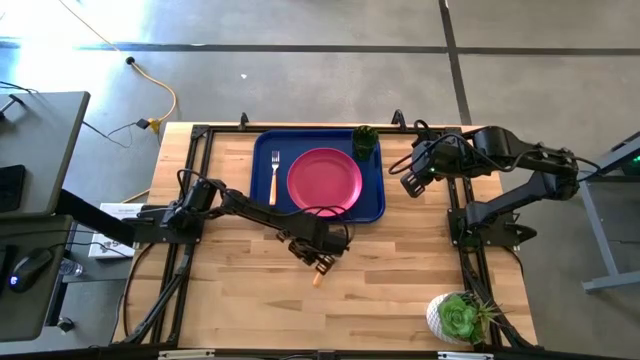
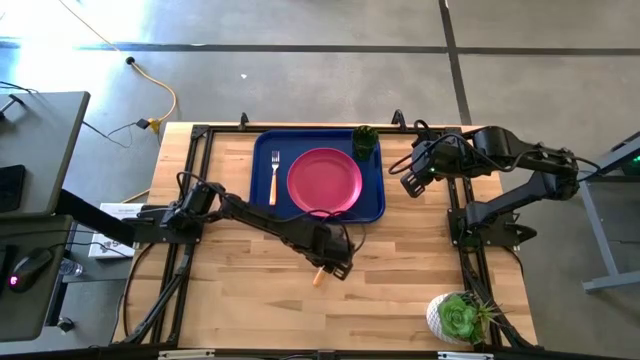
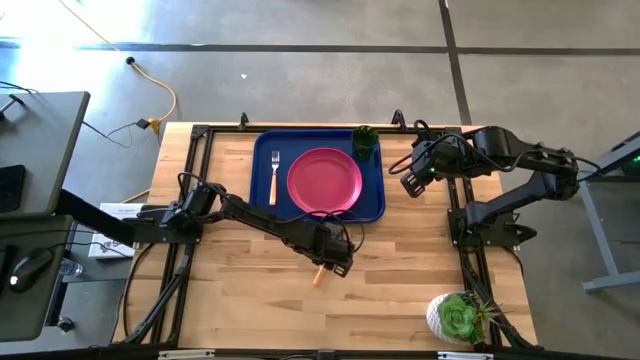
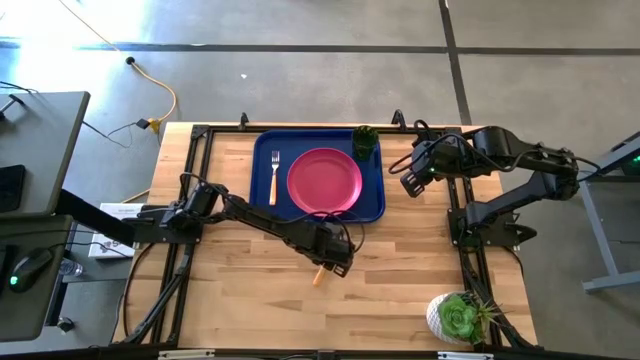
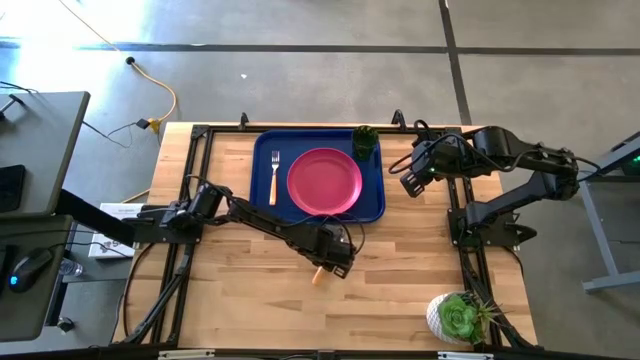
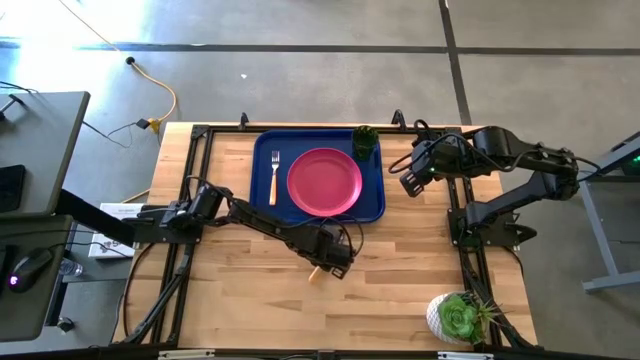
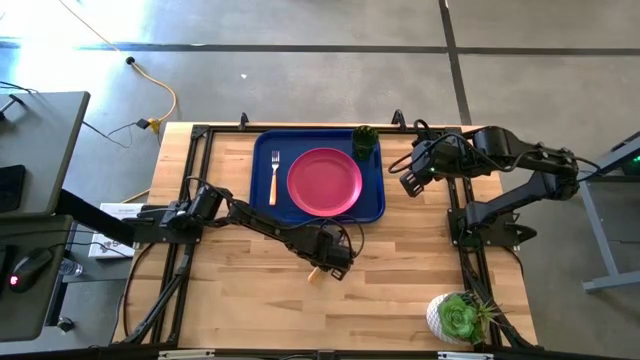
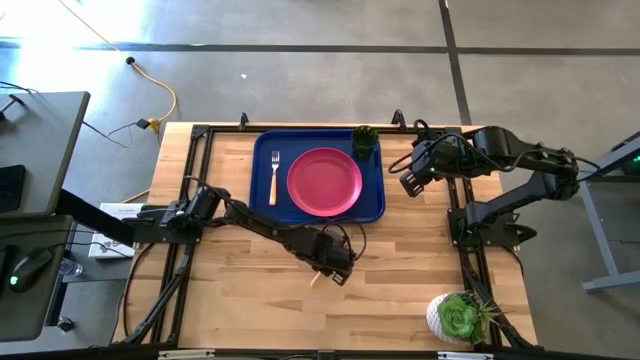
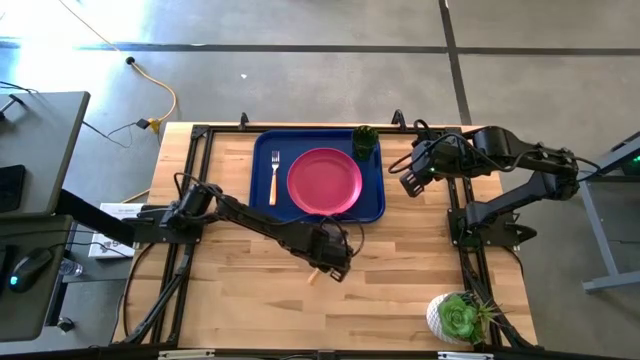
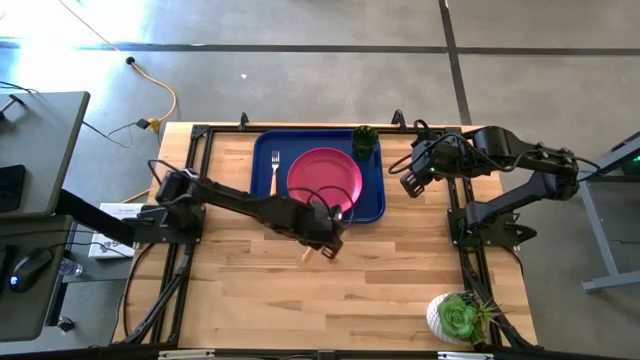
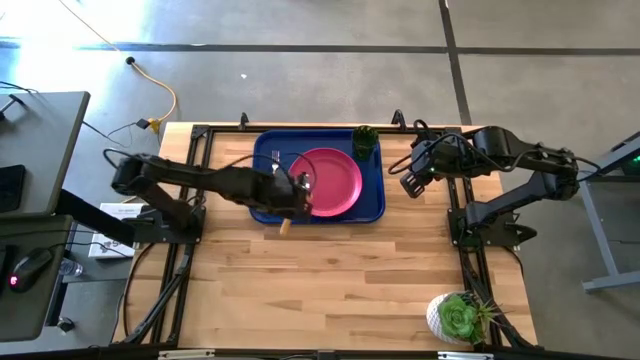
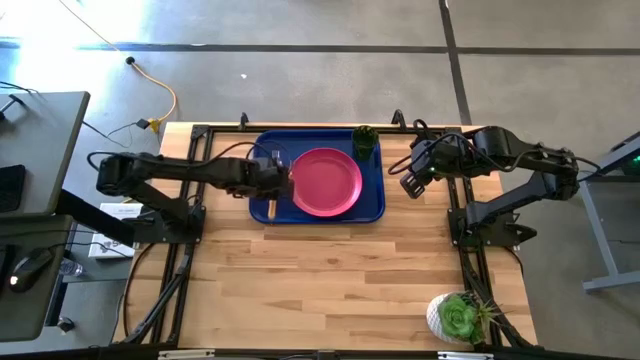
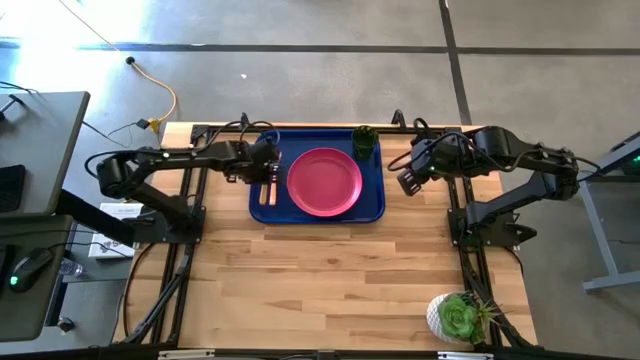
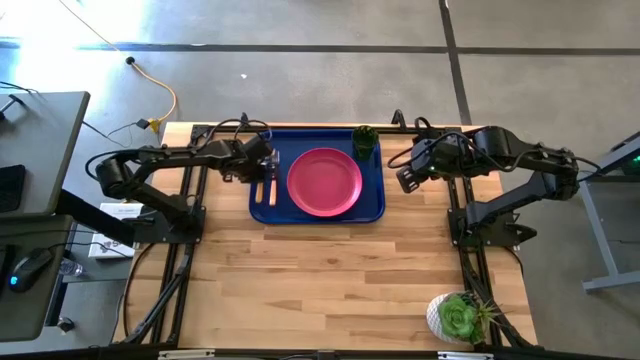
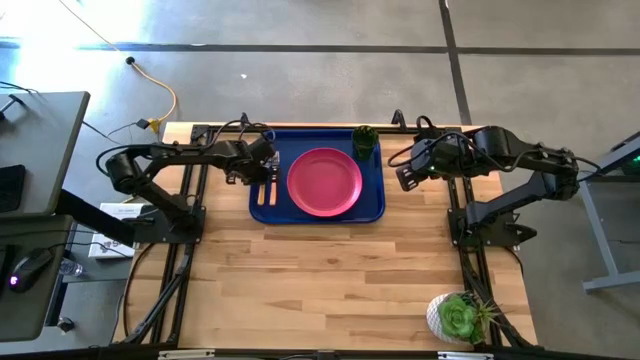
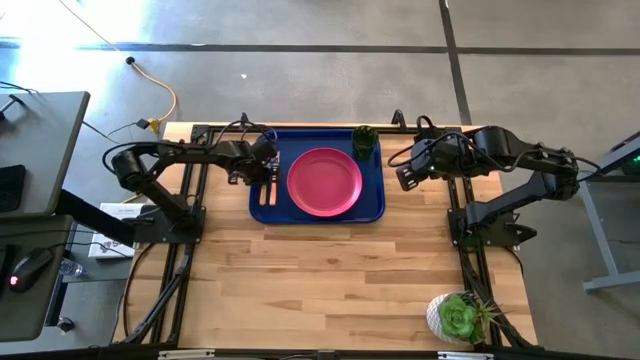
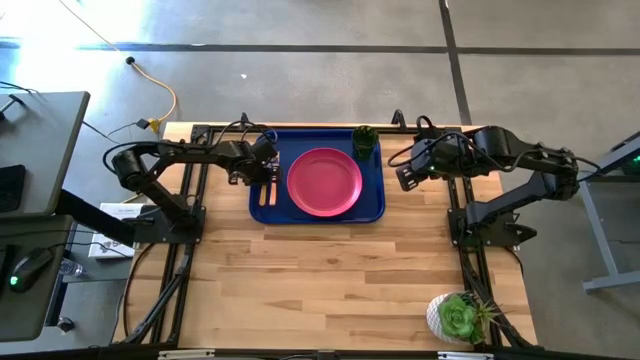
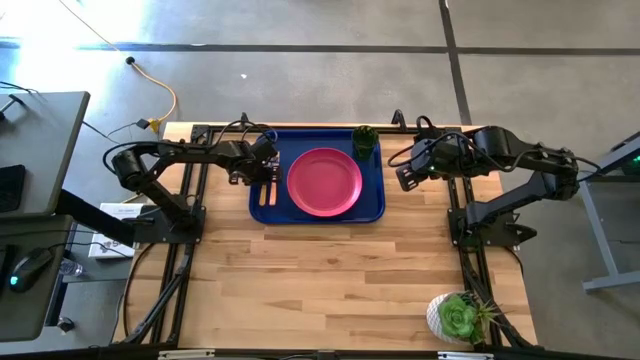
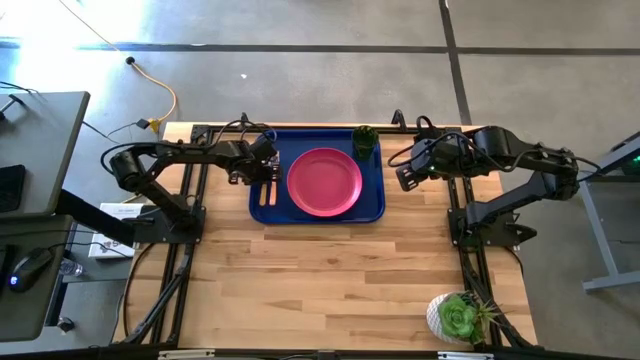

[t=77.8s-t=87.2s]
Task: Pick and place plate/cup/fork/spoon on tray
Put the orange spoon on the blue tray to the right of the orange fork

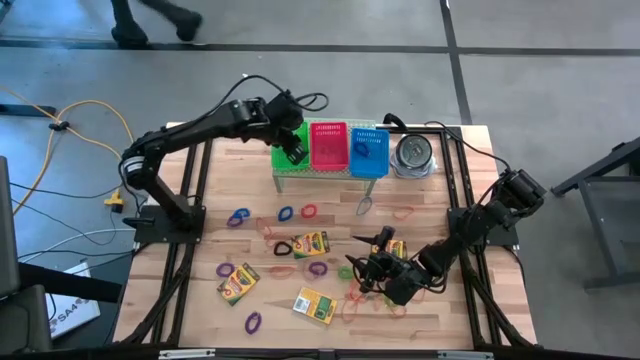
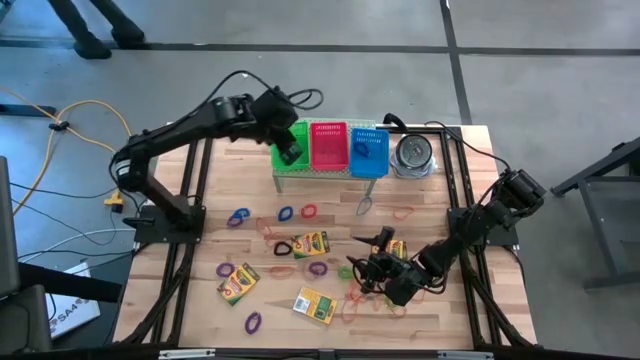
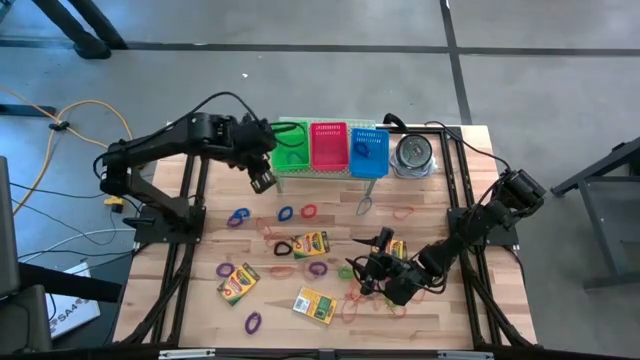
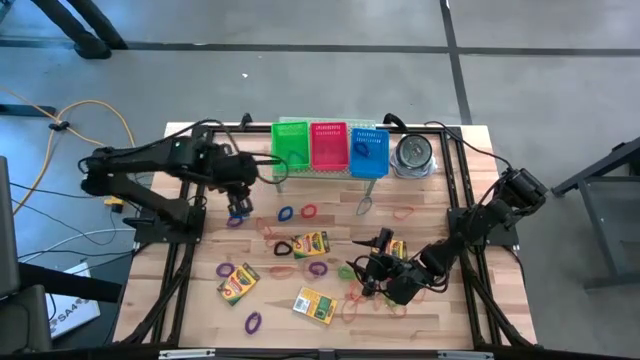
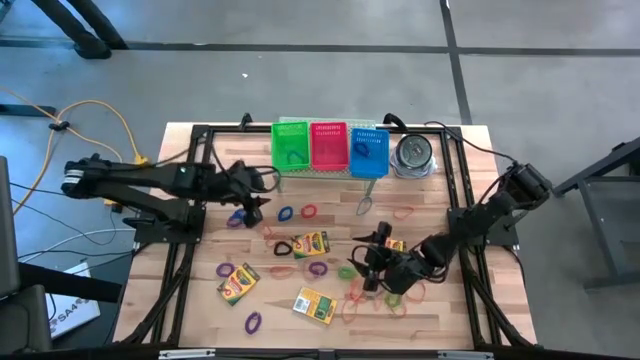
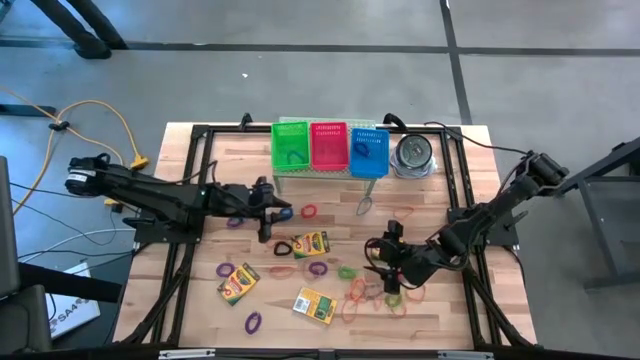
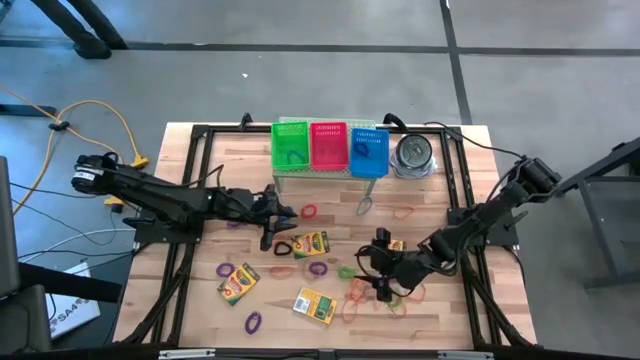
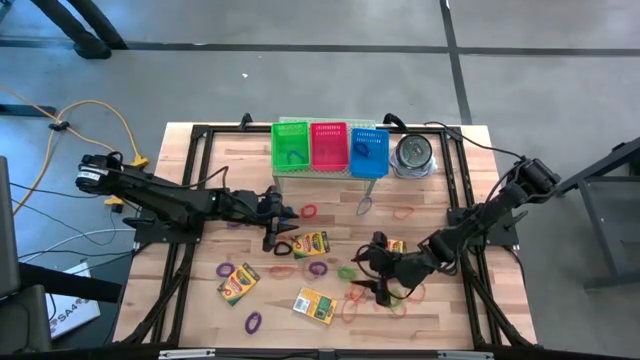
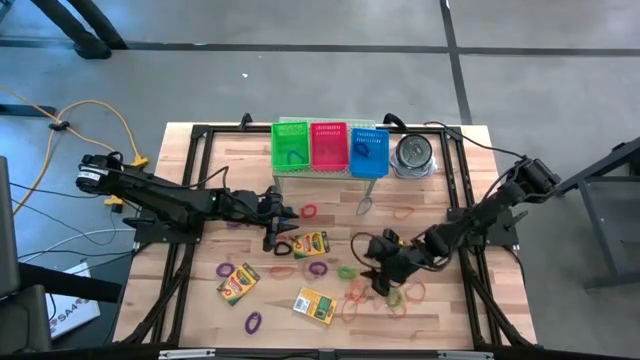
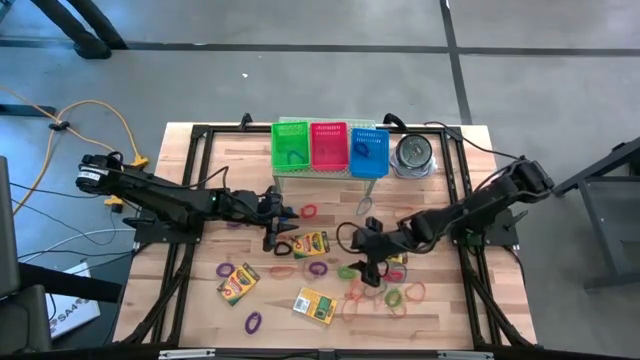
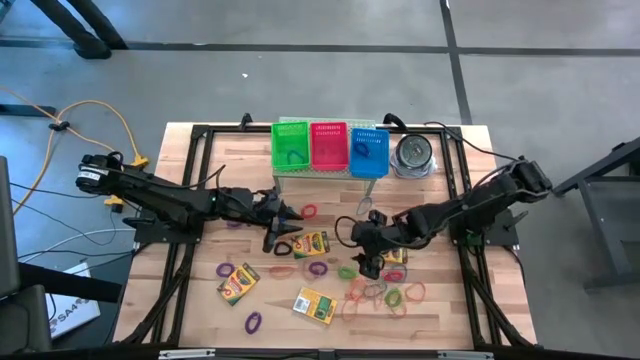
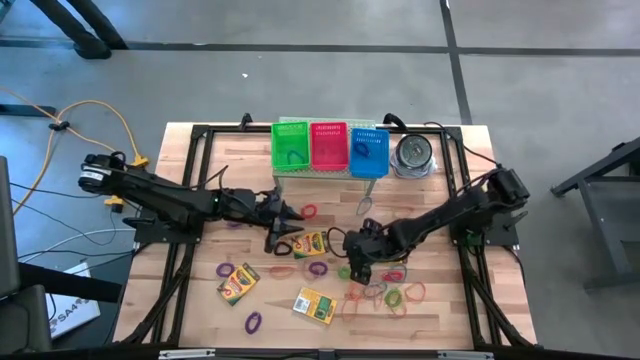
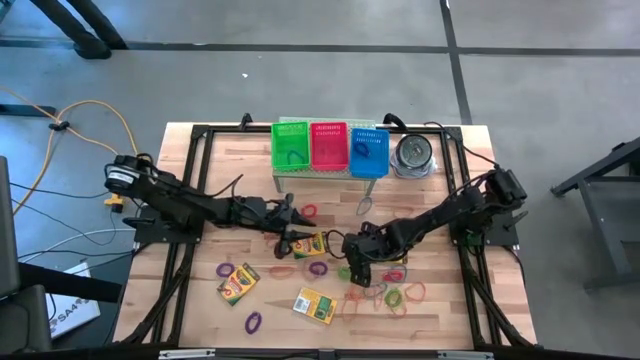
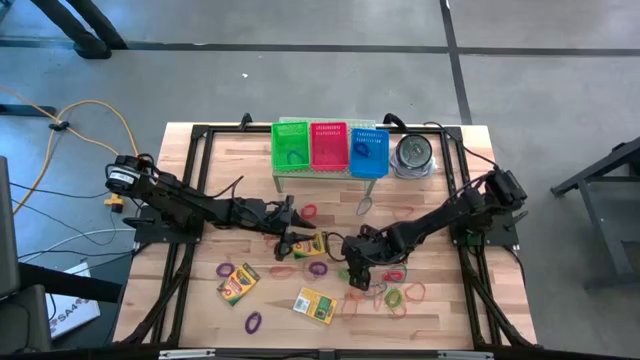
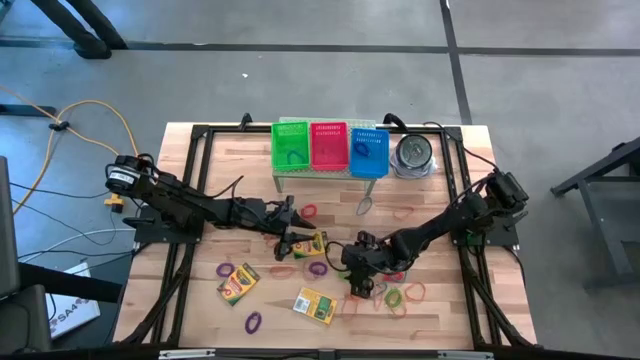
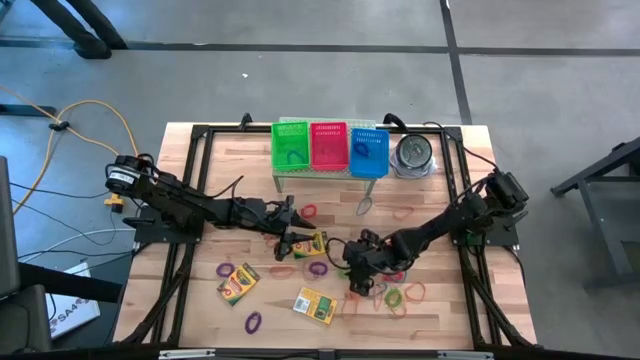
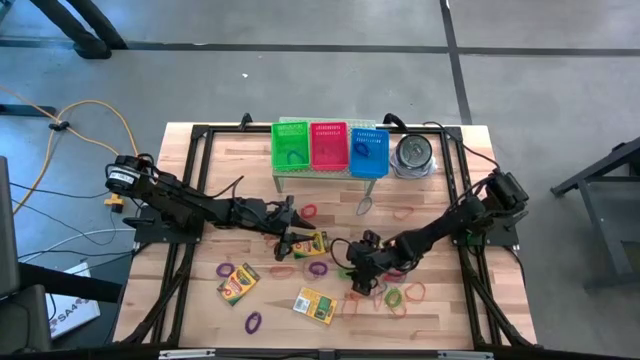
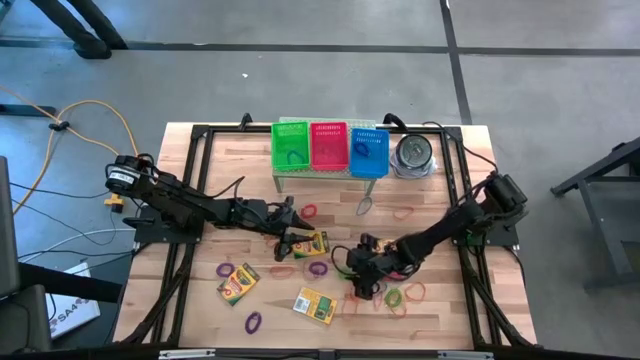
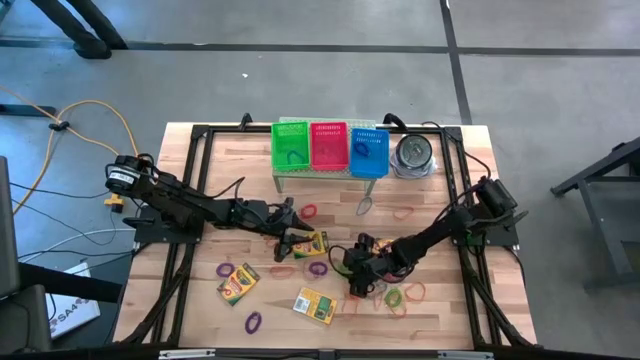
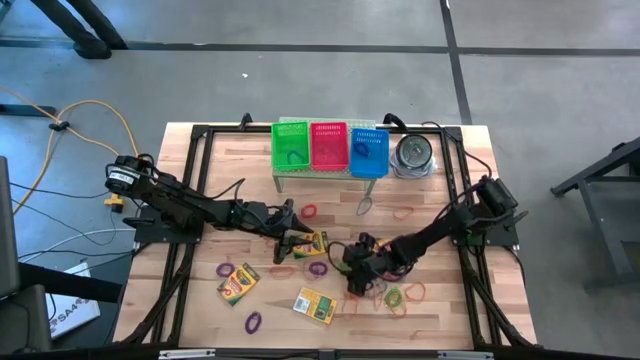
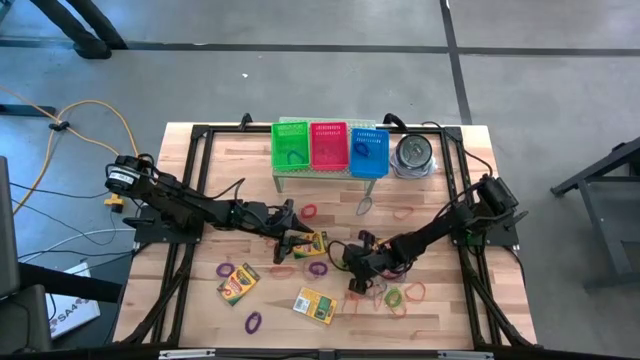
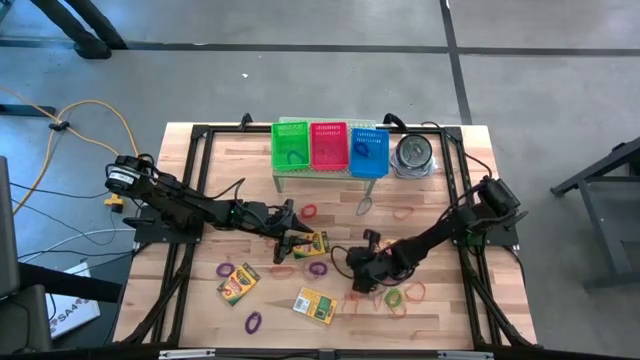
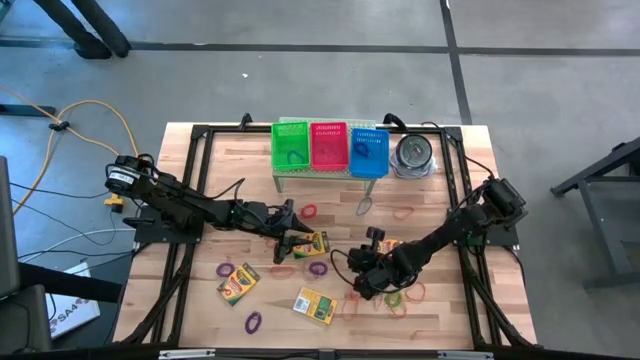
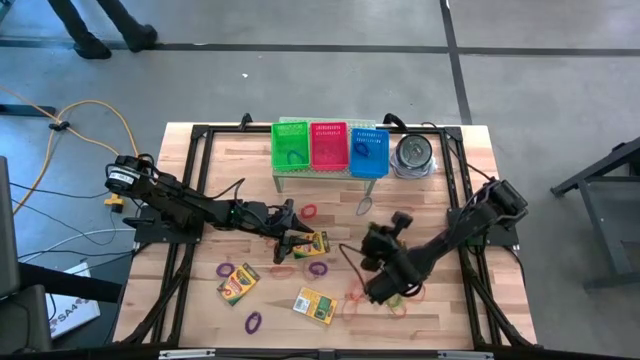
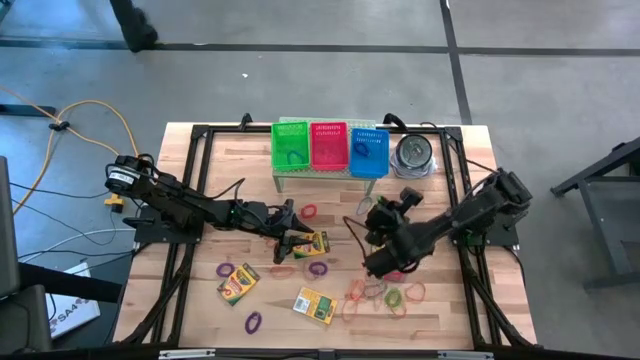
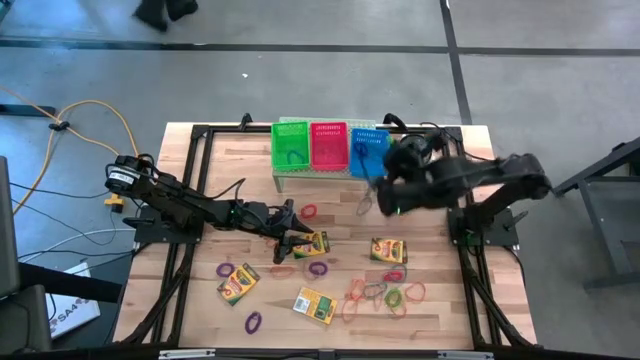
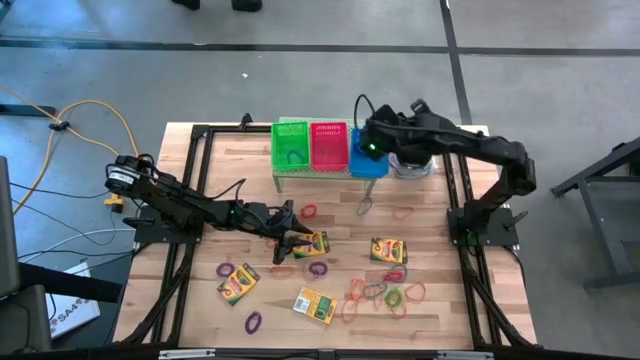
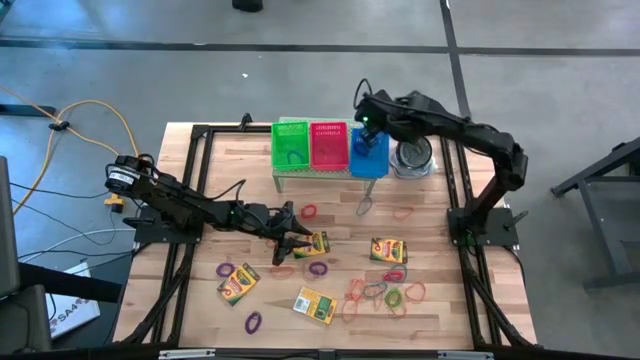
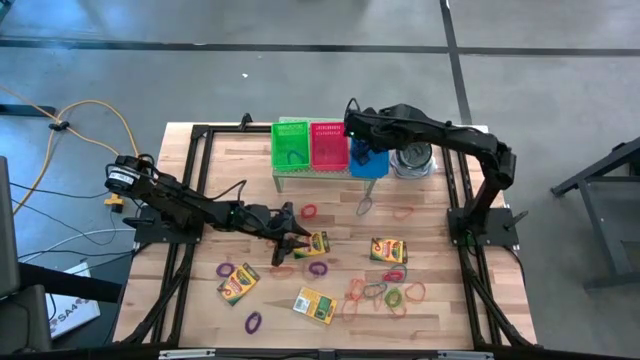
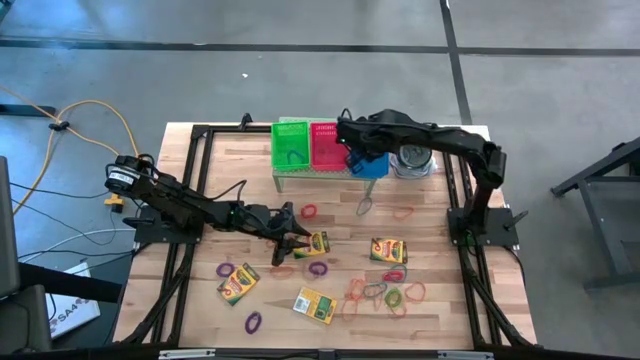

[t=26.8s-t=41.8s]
Task: Pick & Place Office Desk Supplies
Put the top green spring keychain into the blue bin on the shelf
